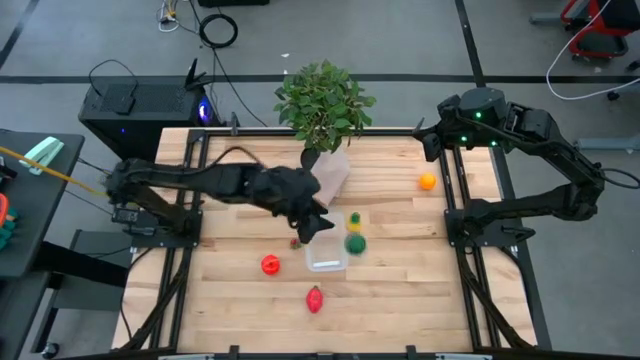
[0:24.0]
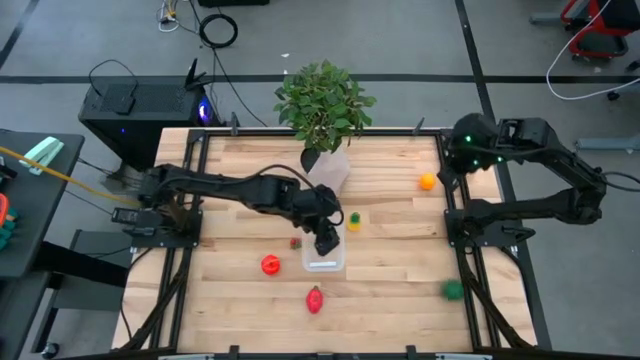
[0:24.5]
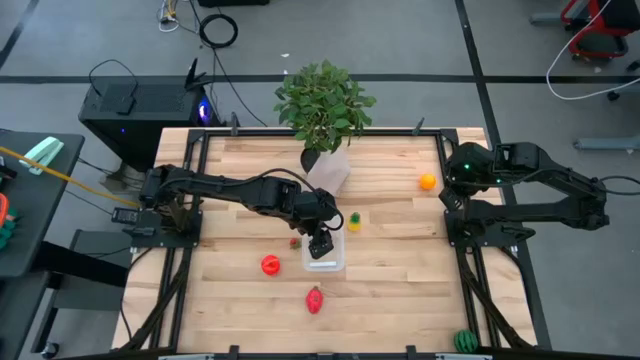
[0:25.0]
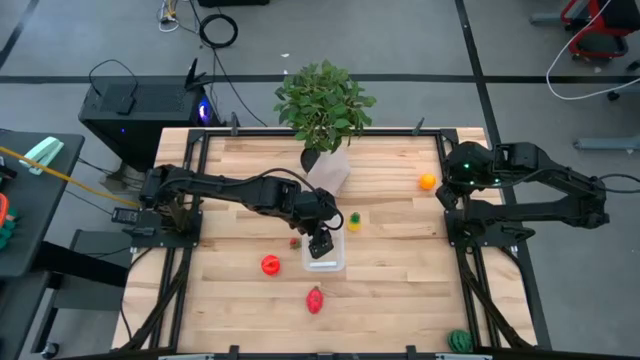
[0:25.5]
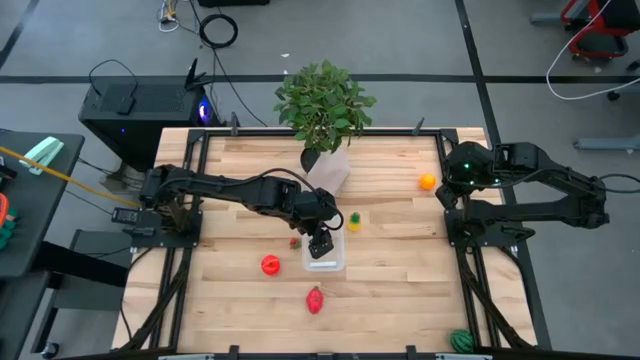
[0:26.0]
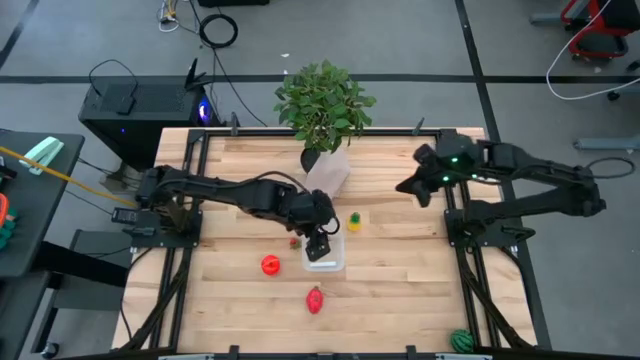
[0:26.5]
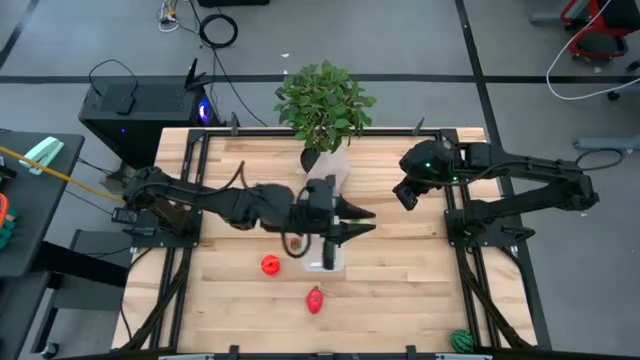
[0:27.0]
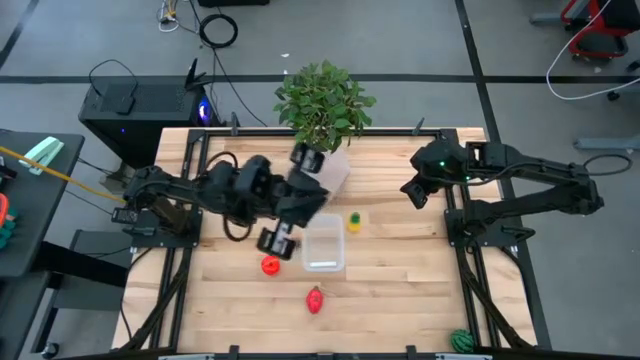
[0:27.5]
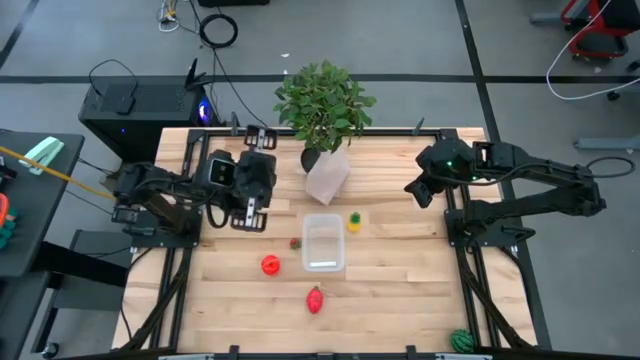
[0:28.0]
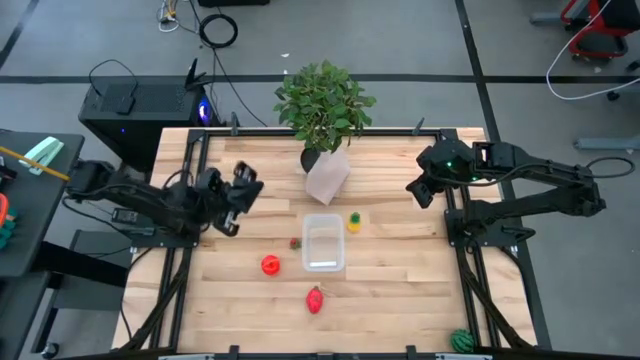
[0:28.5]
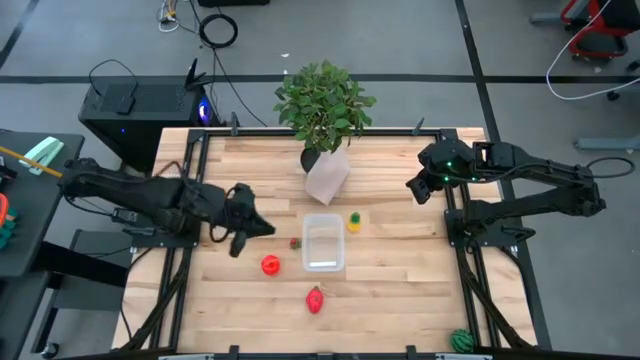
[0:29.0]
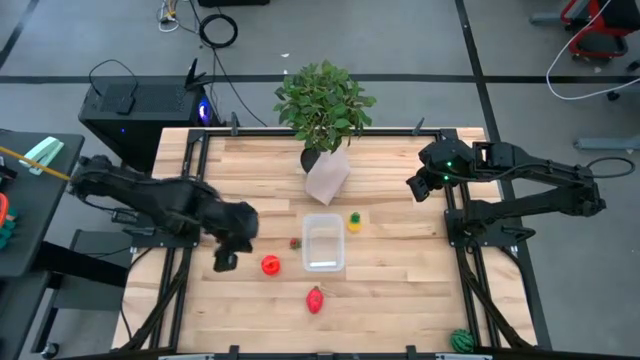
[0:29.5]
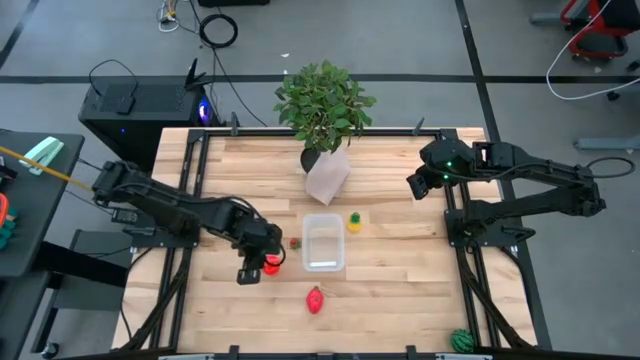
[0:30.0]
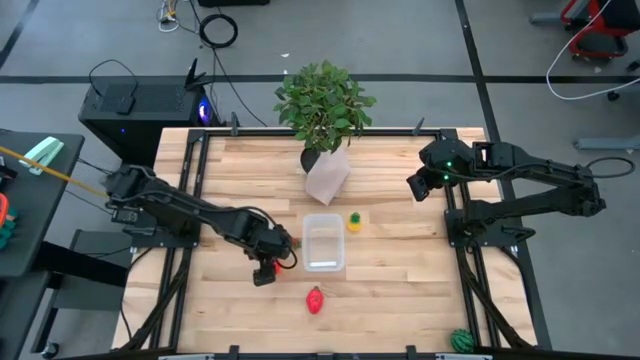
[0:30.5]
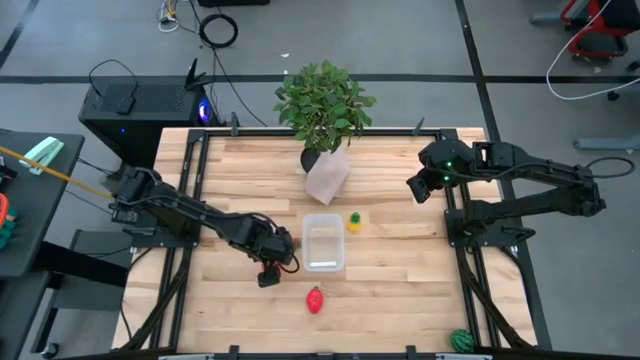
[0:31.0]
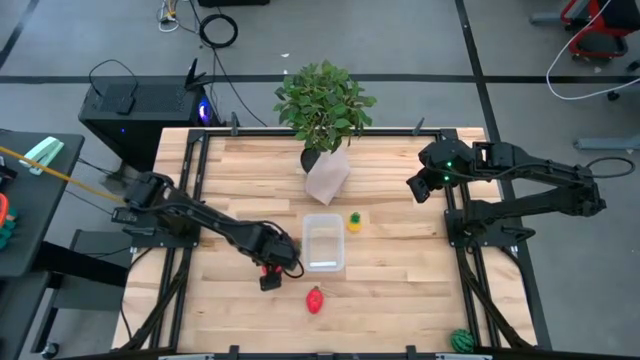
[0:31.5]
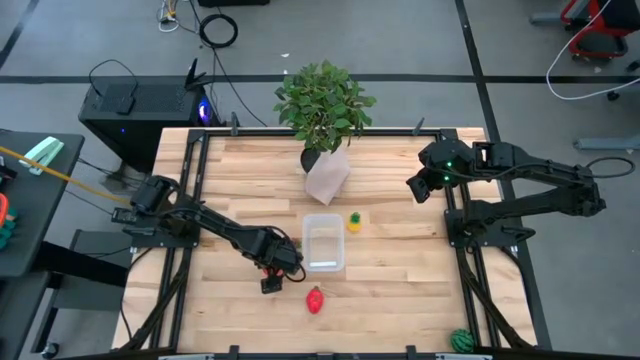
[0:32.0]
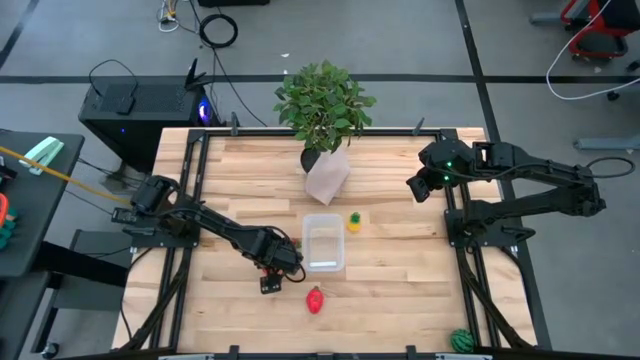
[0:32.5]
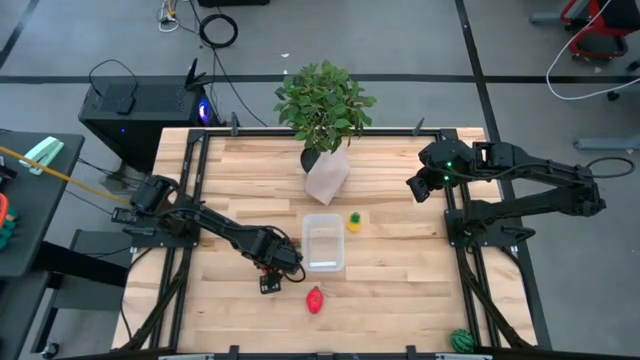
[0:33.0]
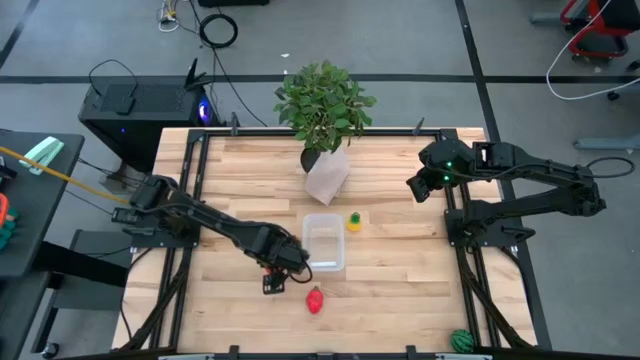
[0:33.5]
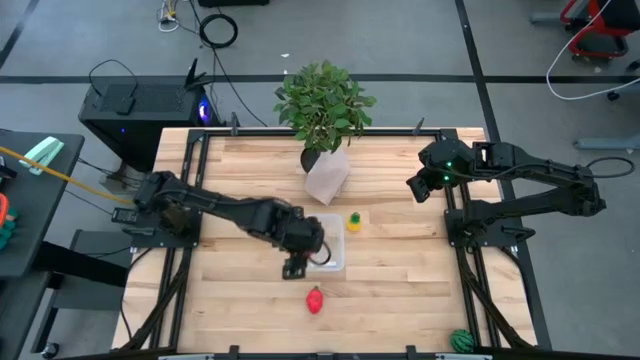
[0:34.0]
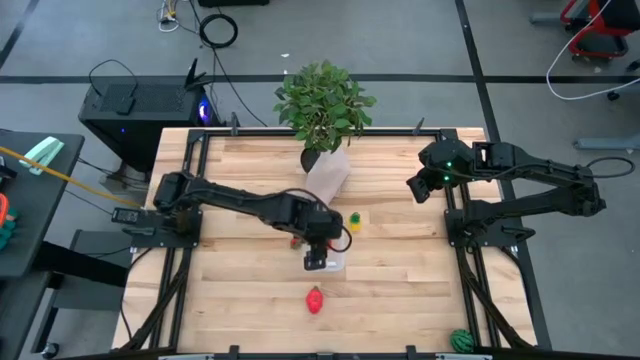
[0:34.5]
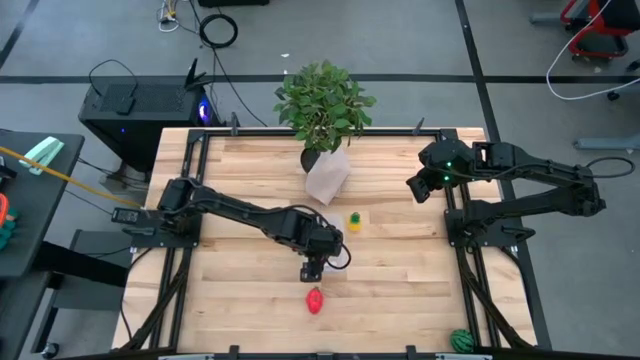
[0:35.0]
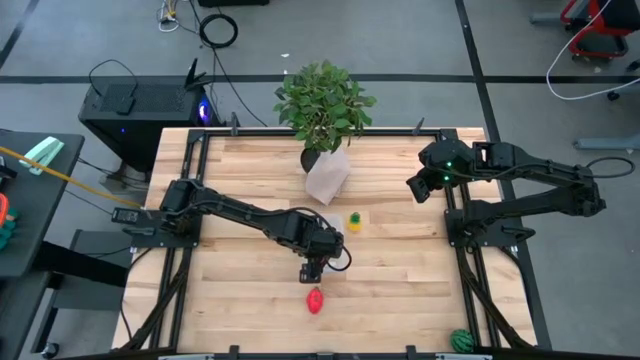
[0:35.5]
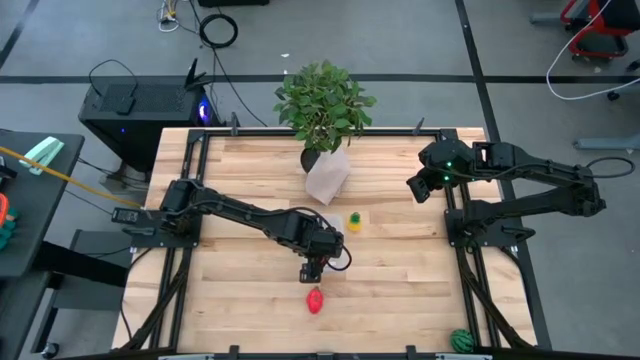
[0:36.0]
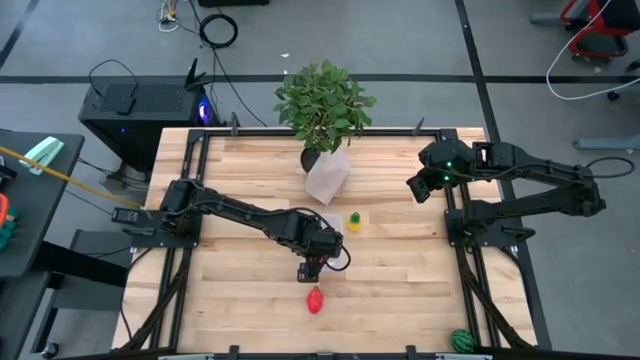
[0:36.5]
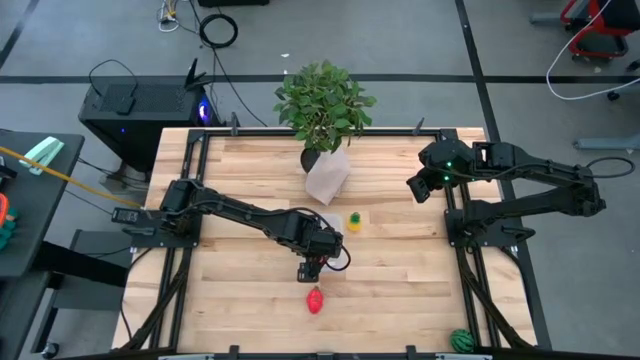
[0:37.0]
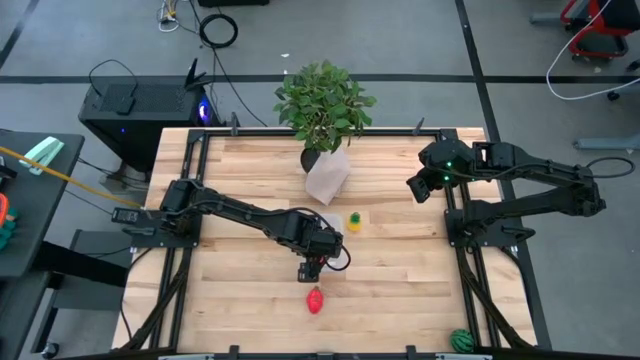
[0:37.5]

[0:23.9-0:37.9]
Task: Pick and placing Produce into tupperware
Put the red apple into the transparent bin
